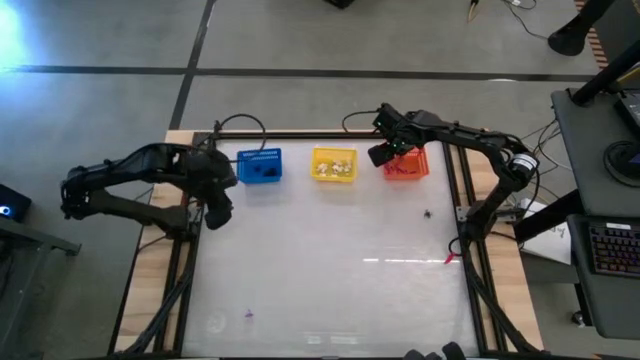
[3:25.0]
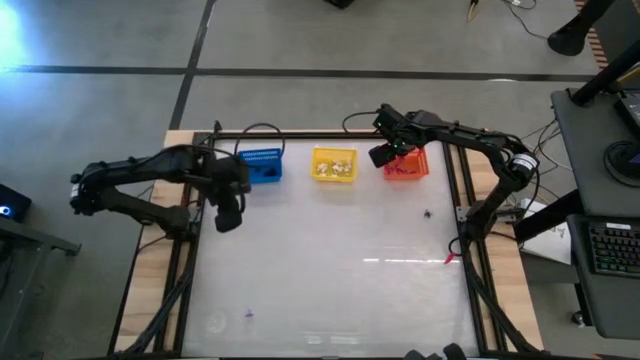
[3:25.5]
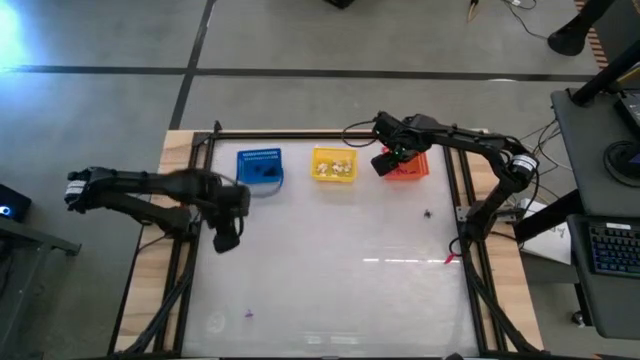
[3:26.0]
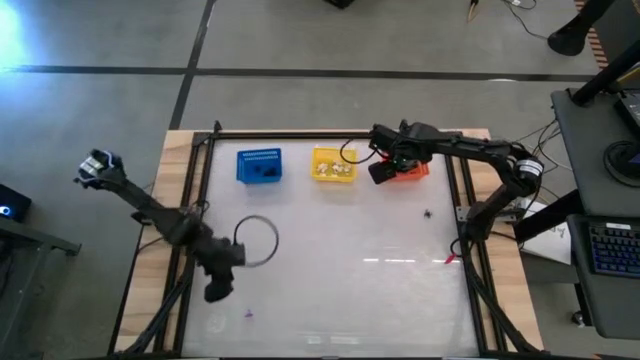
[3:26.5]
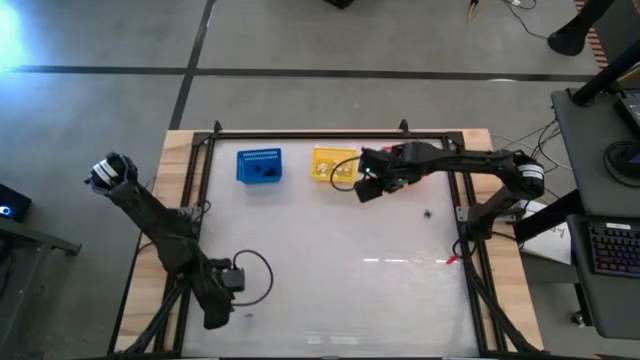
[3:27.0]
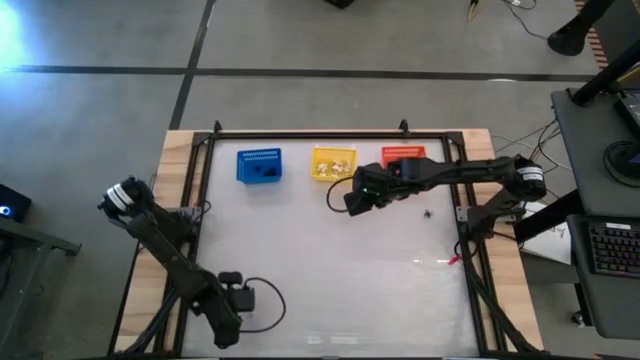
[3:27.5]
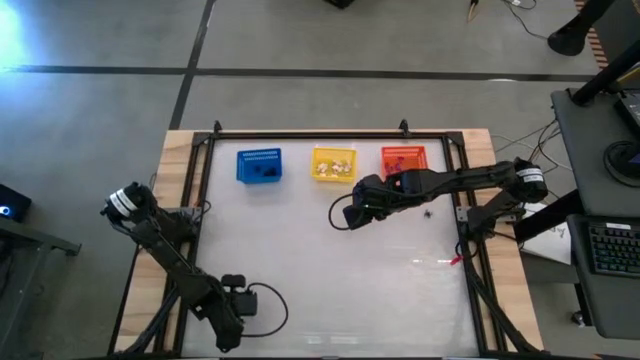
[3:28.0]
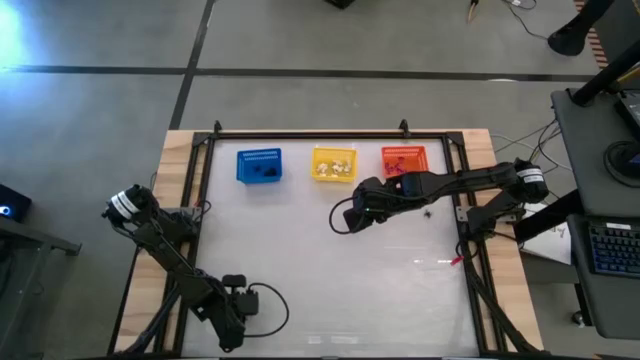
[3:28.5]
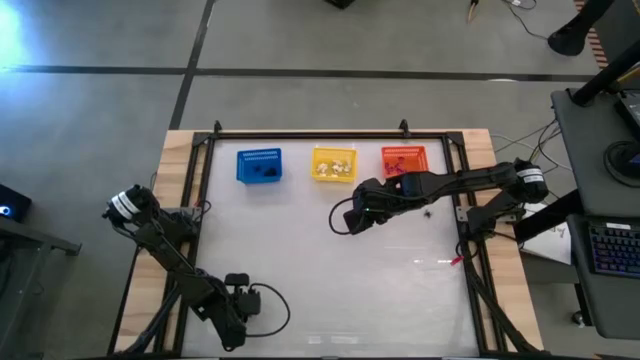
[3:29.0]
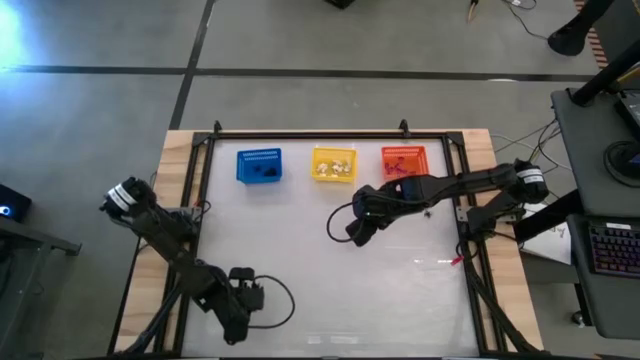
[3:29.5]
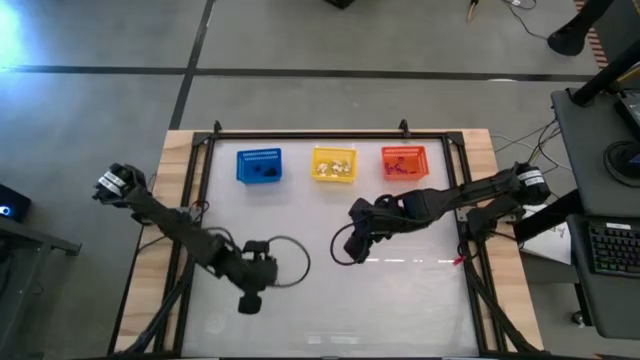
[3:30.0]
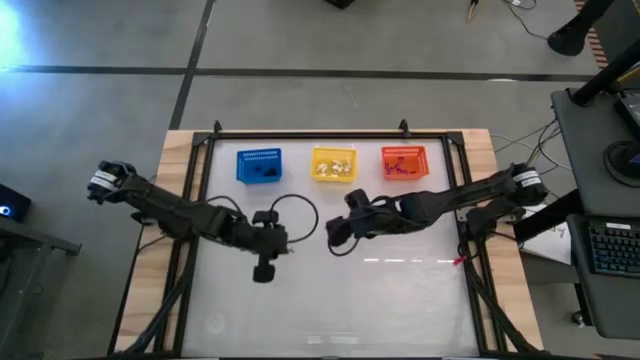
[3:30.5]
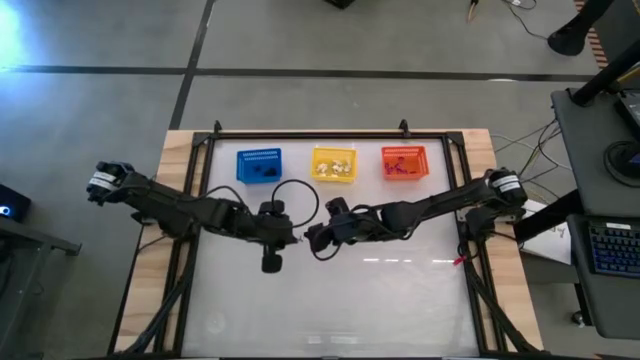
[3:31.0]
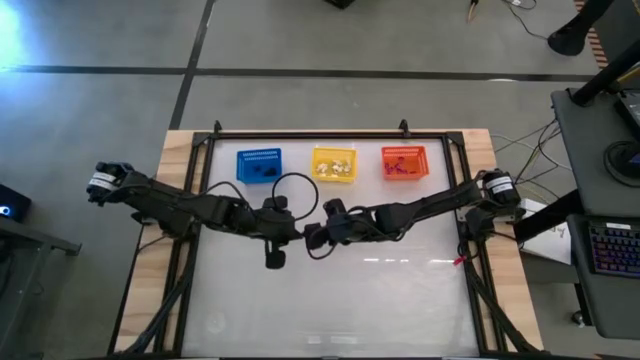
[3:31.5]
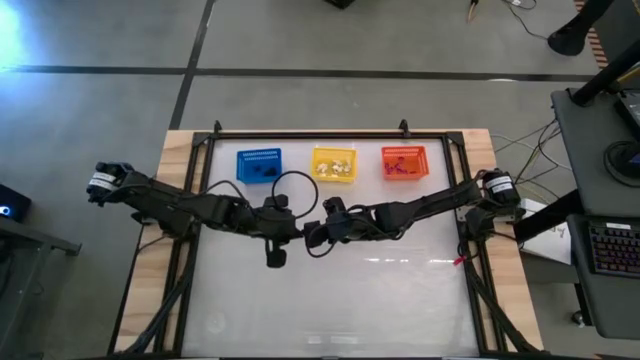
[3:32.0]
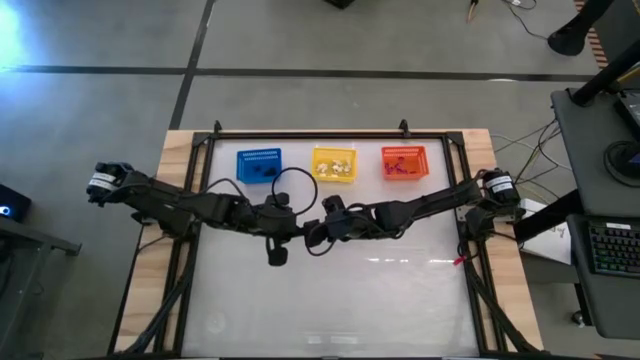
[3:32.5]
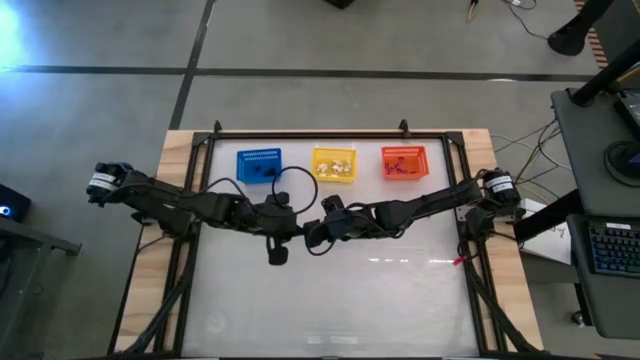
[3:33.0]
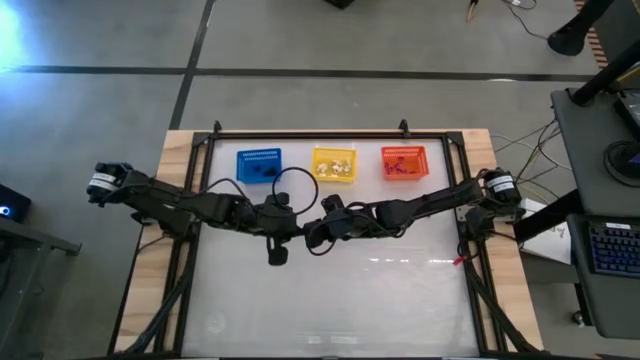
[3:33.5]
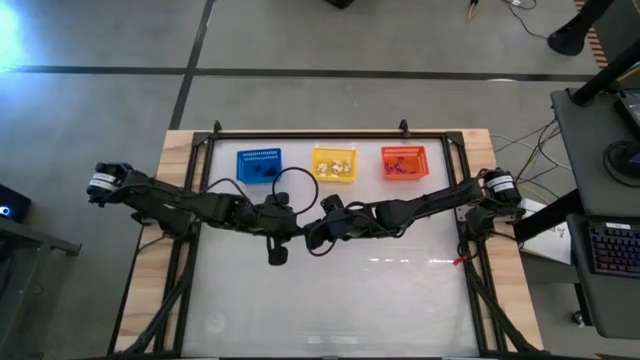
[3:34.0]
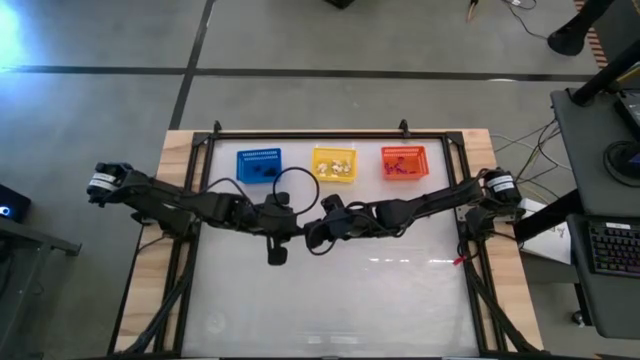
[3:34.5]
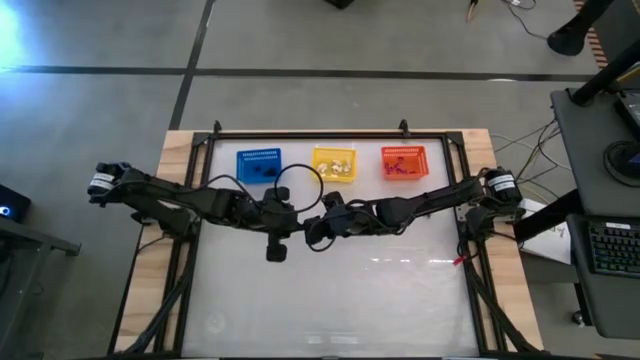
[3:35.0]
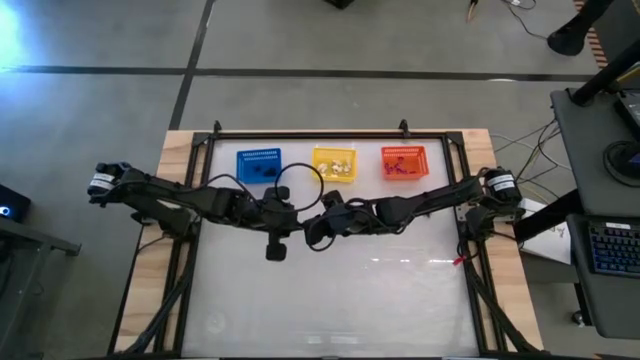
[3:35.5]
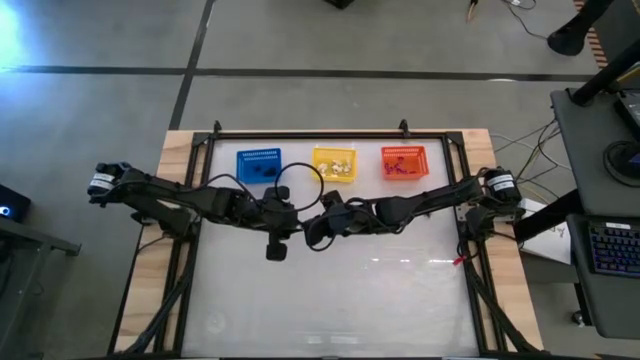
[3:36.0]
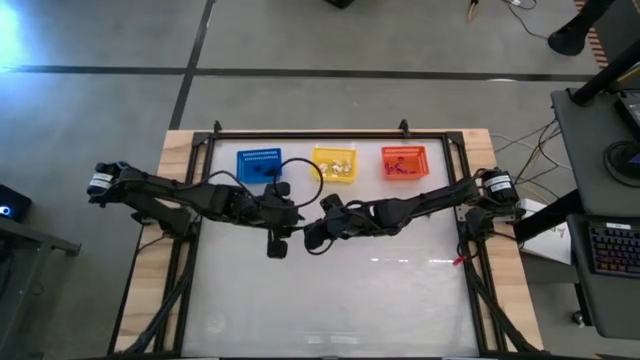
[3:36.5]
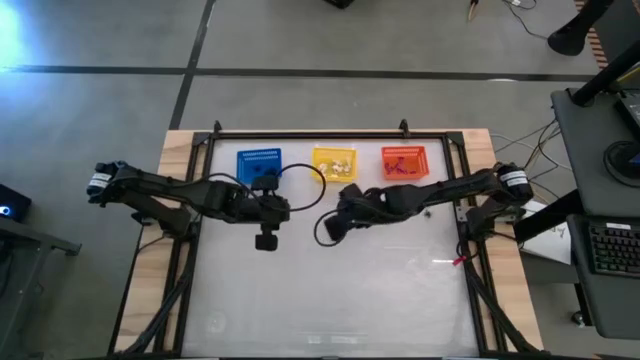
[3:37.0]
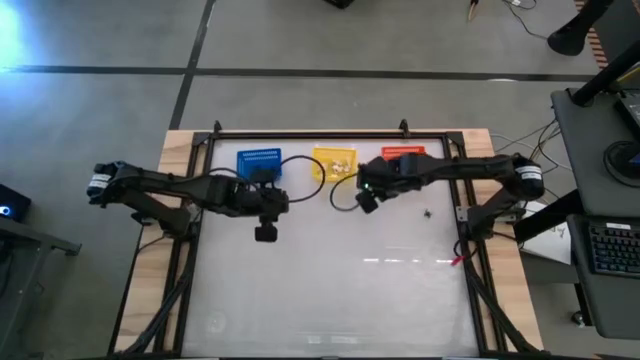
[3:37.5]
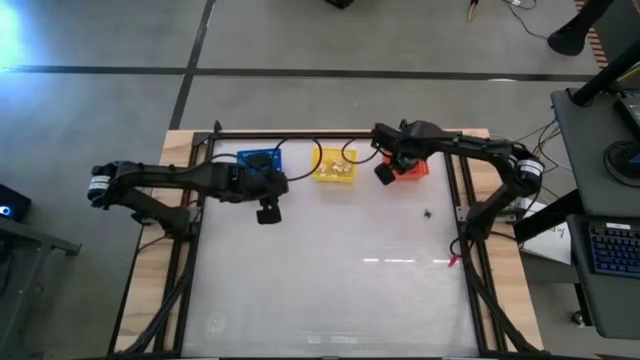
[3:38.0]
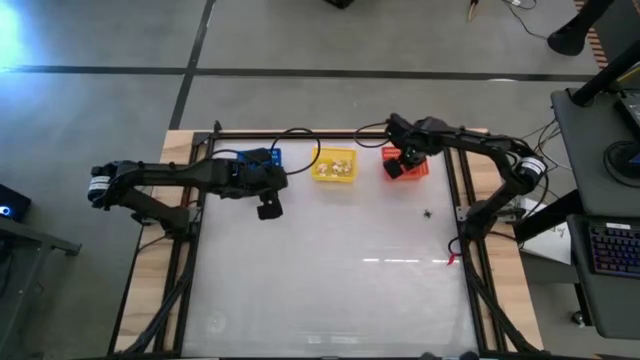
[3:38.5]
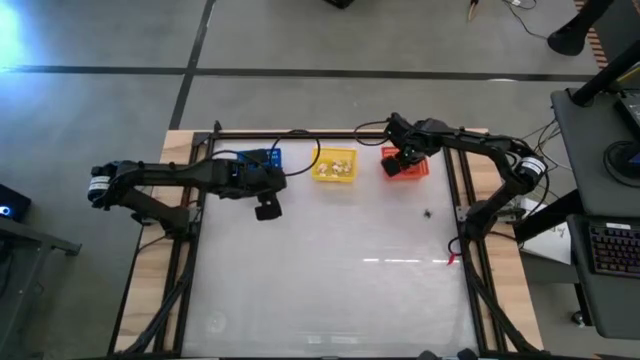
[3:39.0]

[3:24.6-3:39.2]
Task: Sort Halloween decoration
Put the purple hat toy into the orange bin

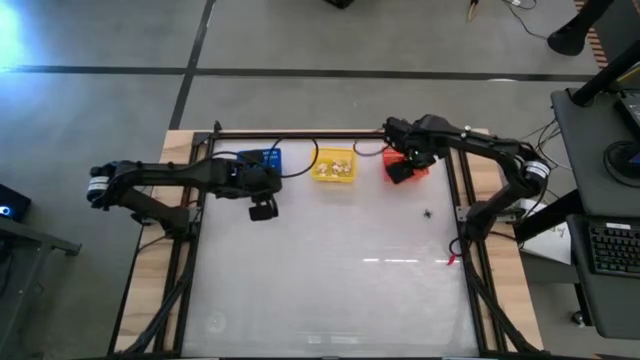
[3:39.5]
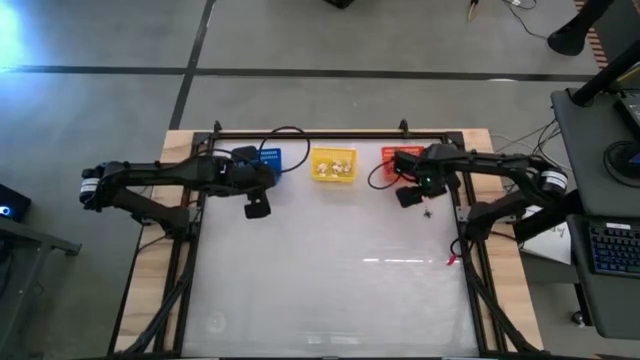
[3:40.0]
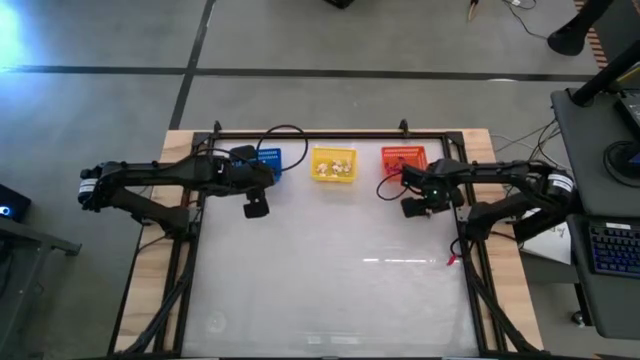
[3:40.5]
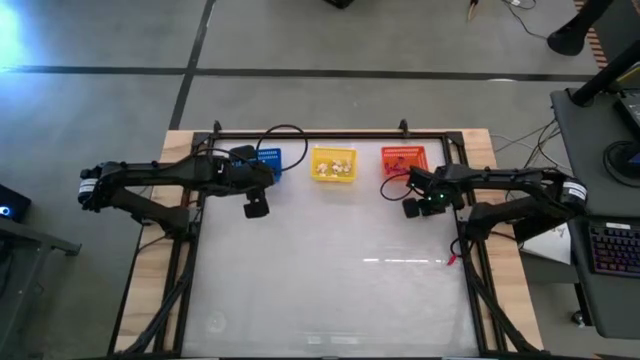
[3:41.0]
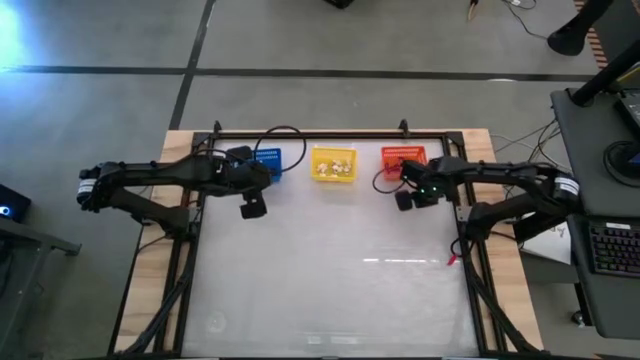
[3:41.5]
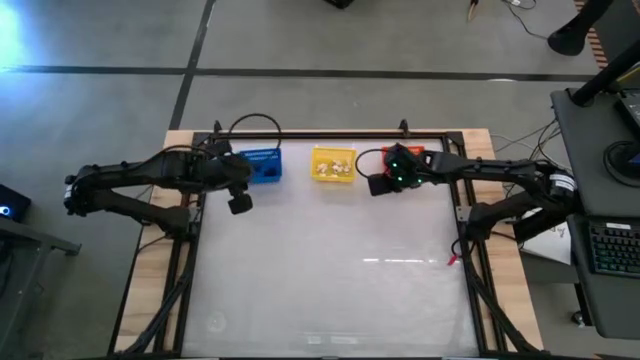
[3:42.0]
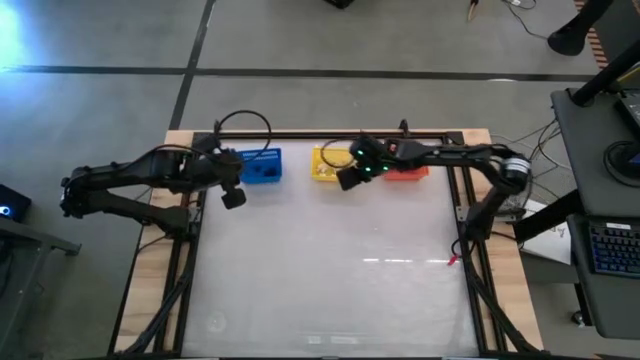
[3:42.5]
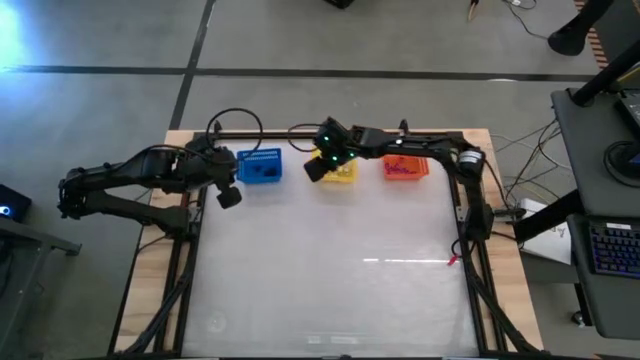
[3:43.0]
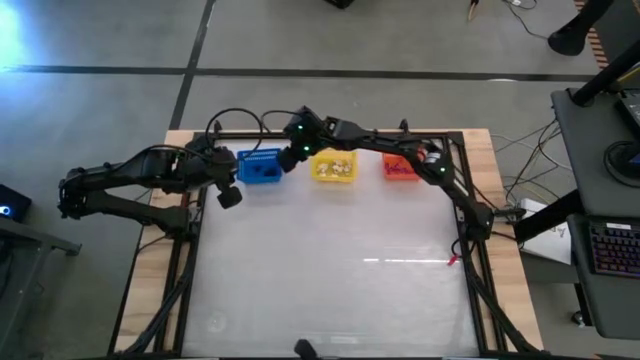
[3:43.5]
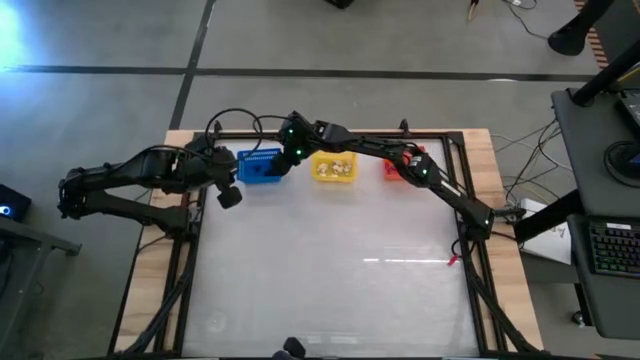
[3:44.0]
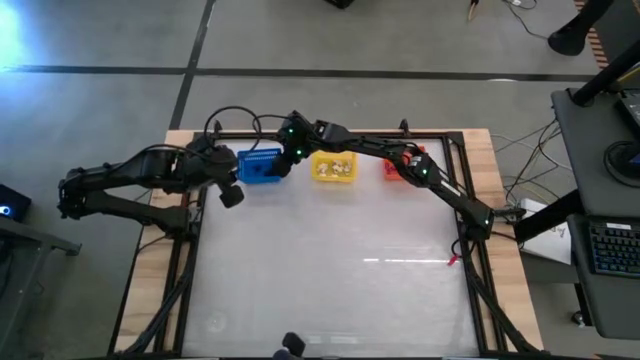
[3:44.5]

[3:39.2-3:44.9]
Put the black spider toy into the blue bin
